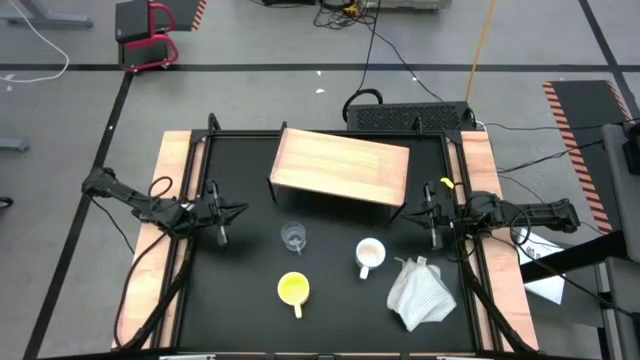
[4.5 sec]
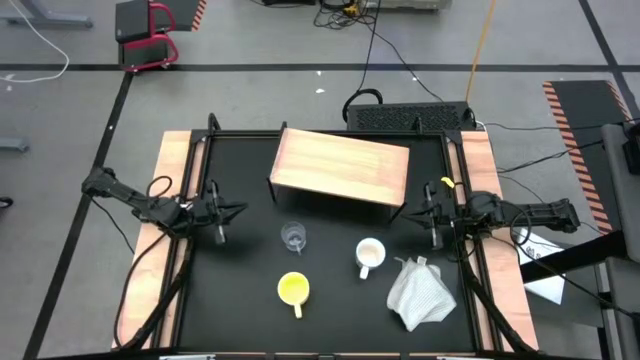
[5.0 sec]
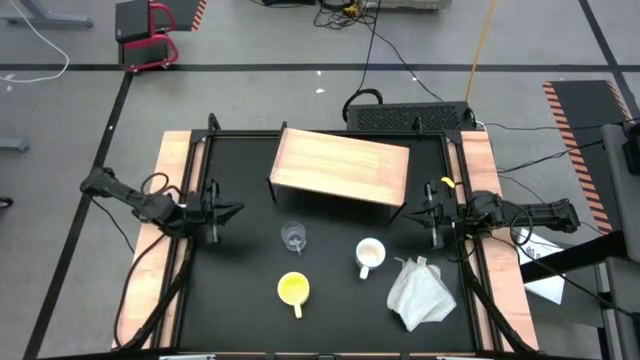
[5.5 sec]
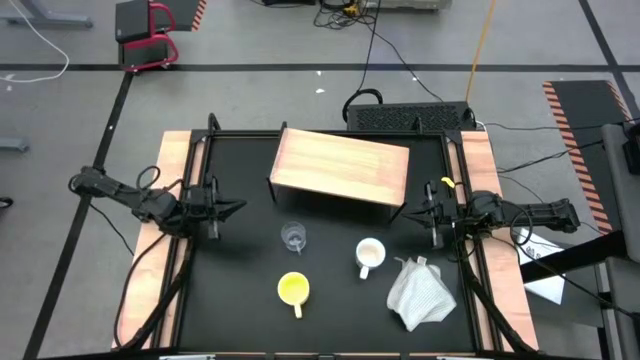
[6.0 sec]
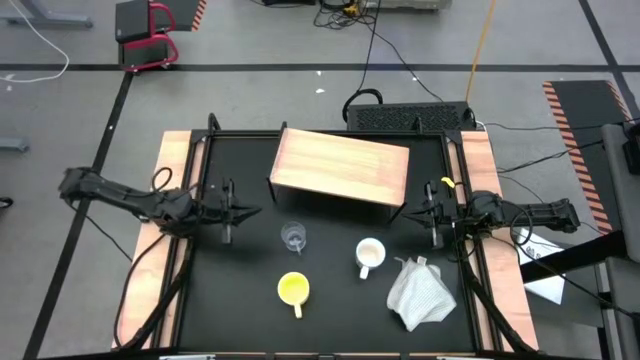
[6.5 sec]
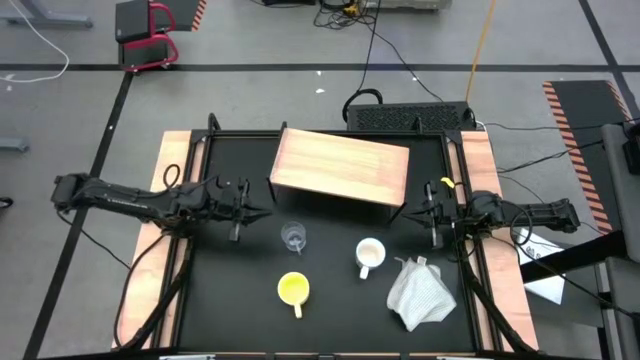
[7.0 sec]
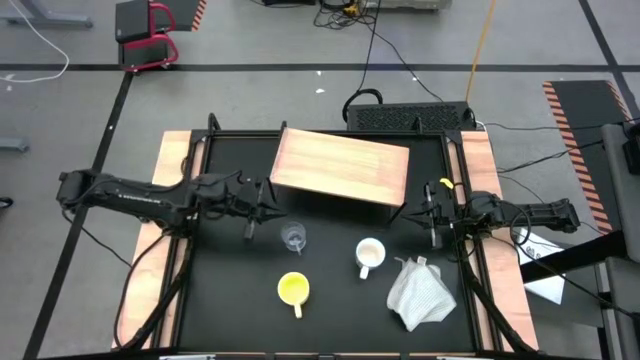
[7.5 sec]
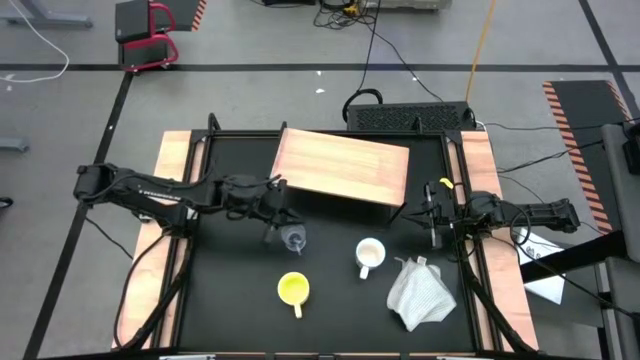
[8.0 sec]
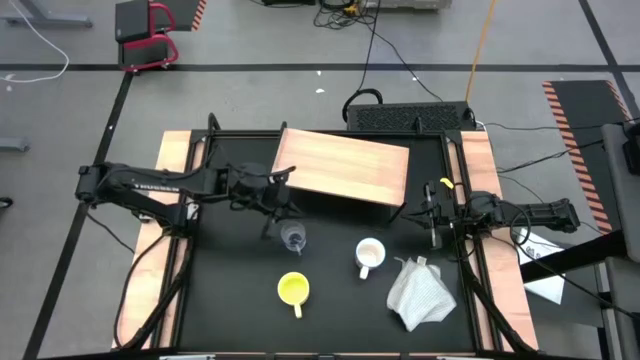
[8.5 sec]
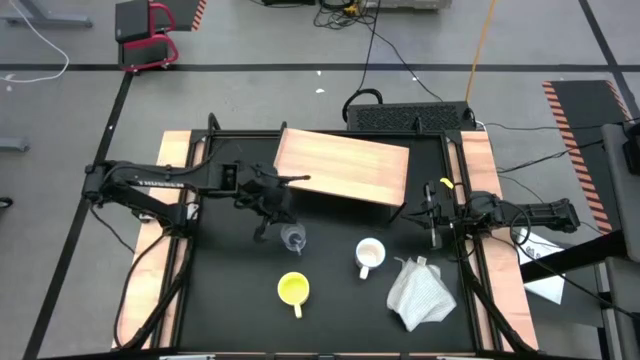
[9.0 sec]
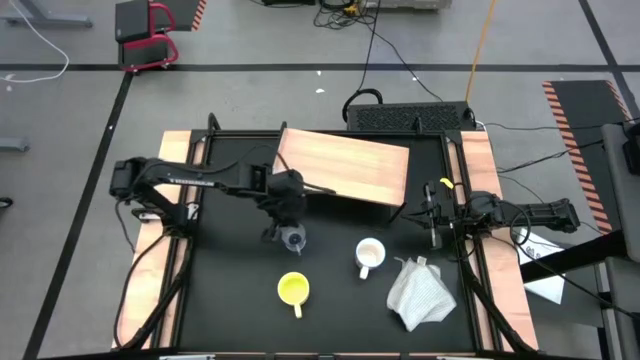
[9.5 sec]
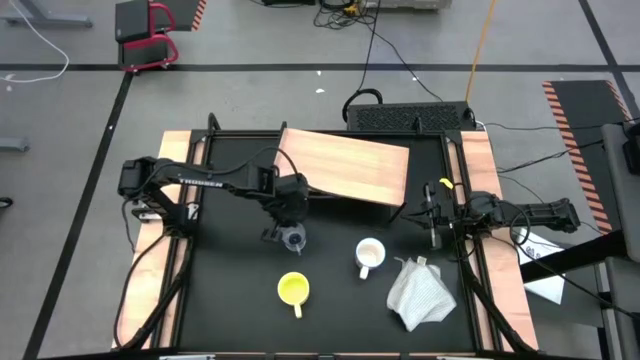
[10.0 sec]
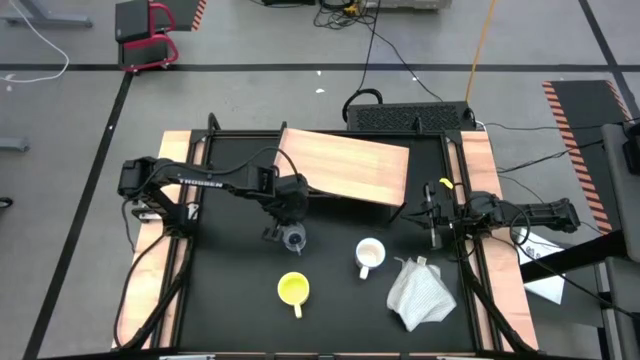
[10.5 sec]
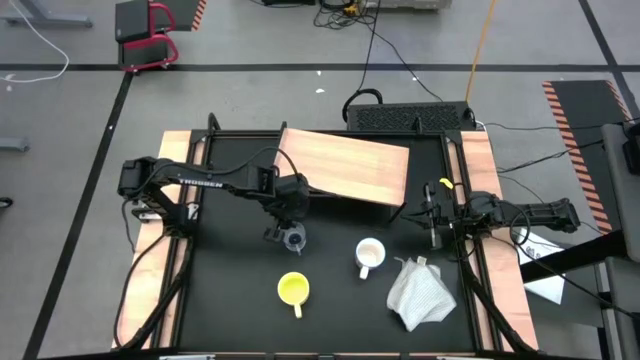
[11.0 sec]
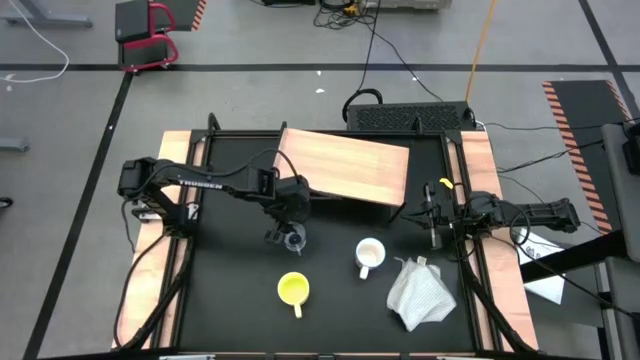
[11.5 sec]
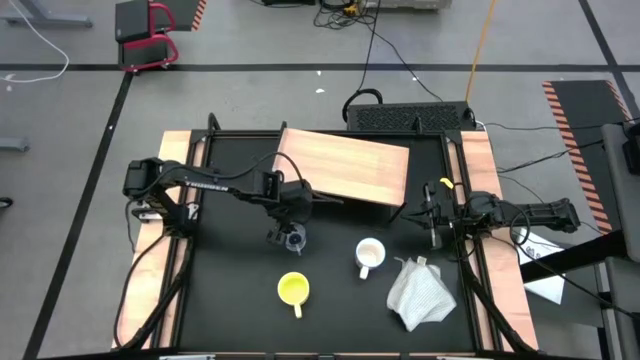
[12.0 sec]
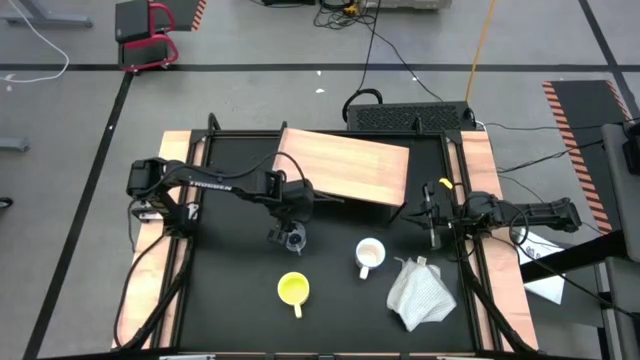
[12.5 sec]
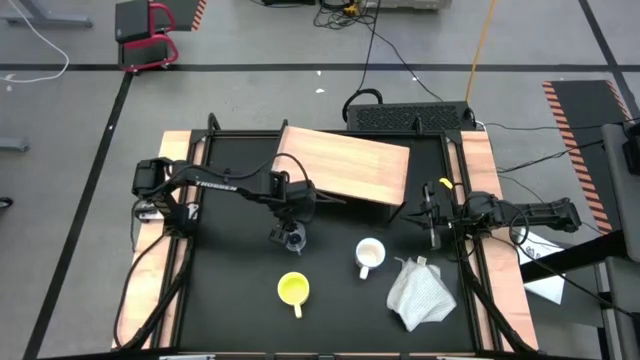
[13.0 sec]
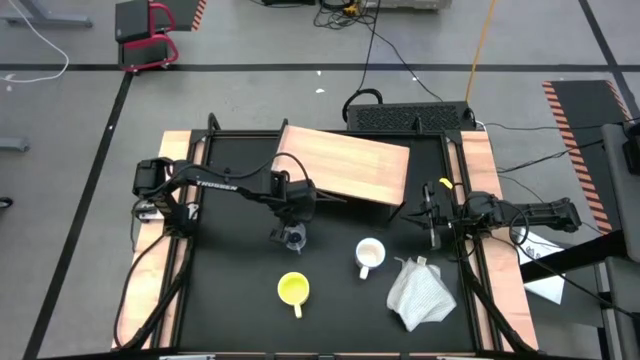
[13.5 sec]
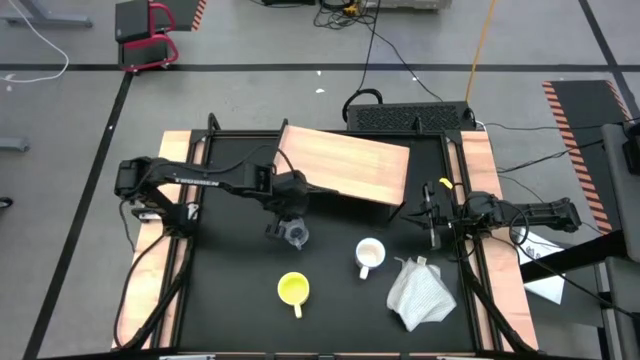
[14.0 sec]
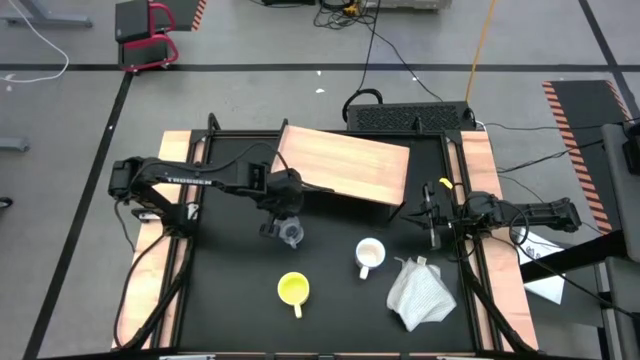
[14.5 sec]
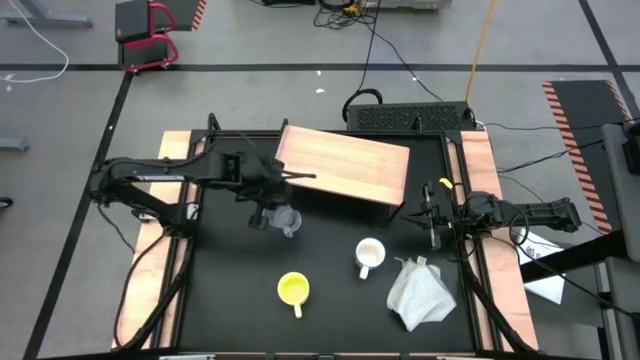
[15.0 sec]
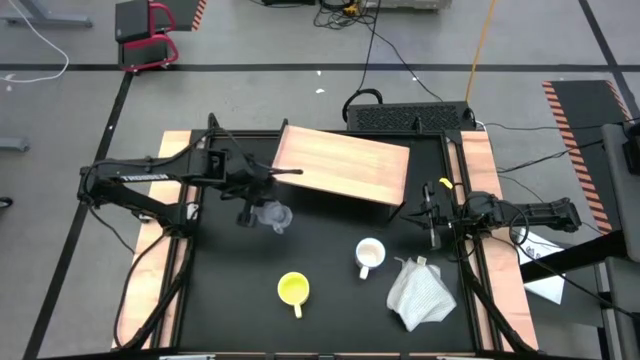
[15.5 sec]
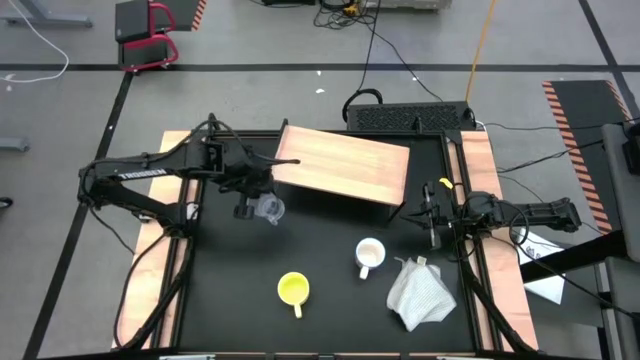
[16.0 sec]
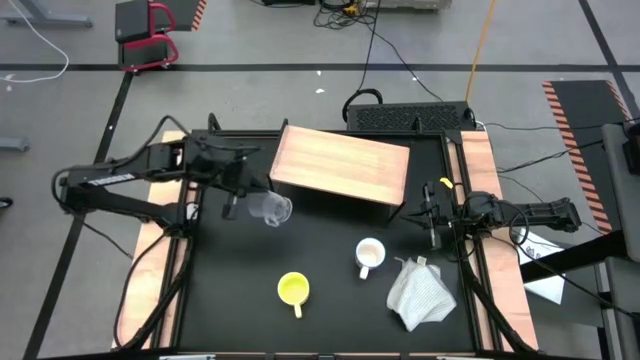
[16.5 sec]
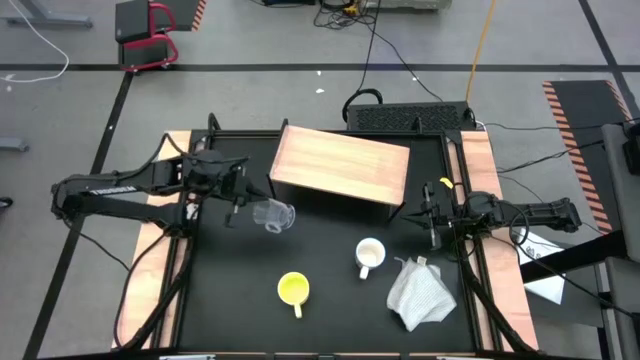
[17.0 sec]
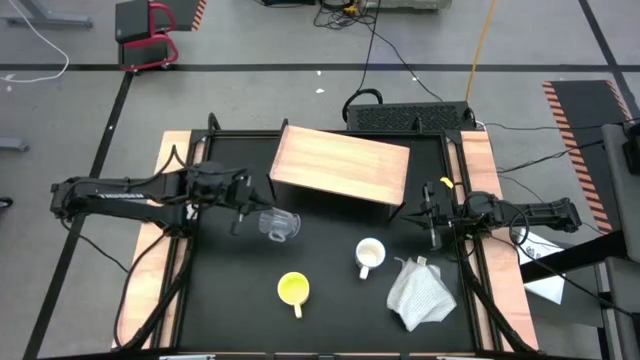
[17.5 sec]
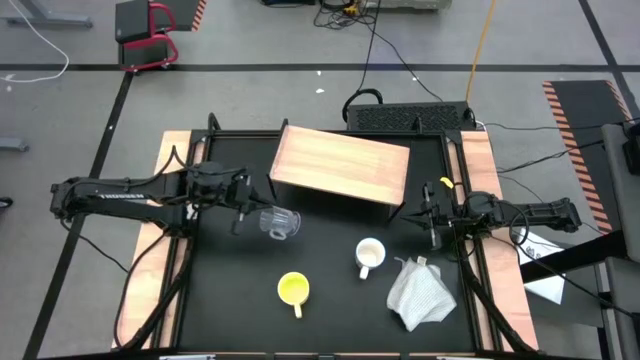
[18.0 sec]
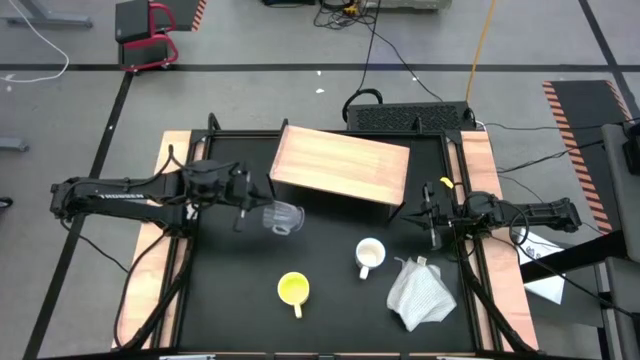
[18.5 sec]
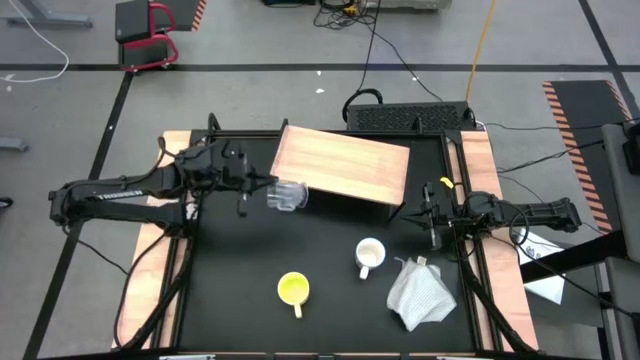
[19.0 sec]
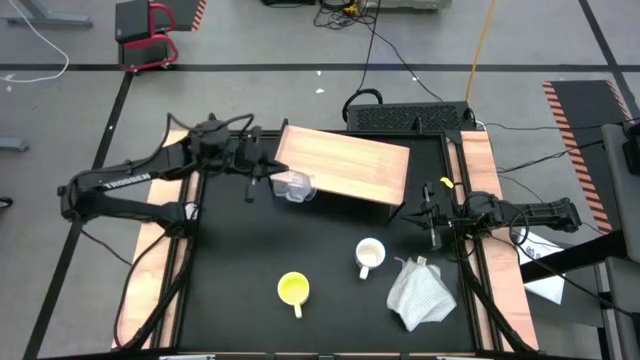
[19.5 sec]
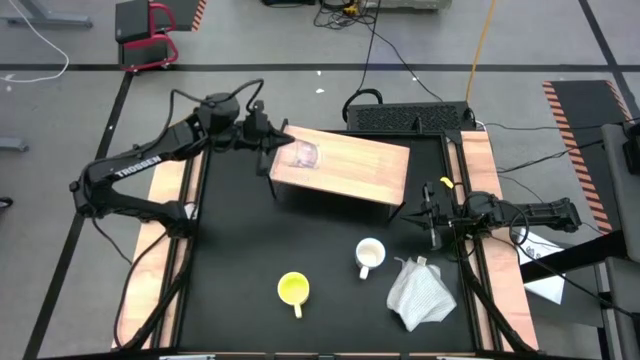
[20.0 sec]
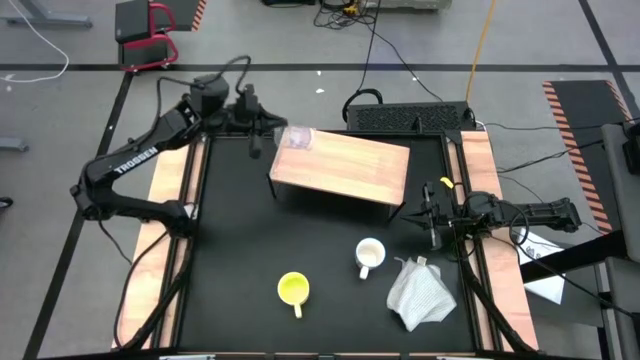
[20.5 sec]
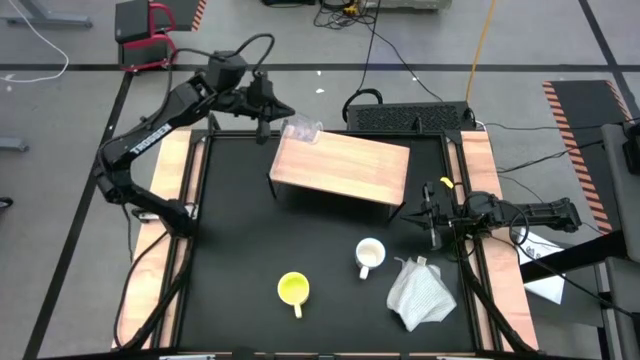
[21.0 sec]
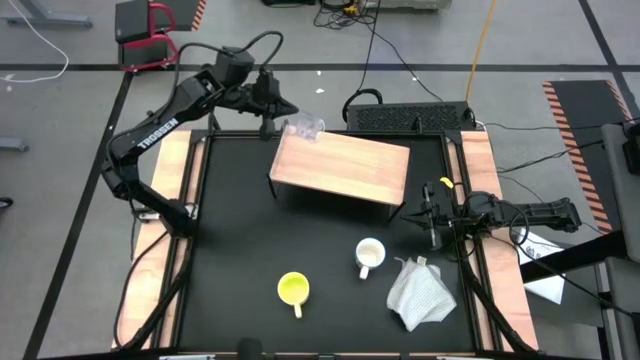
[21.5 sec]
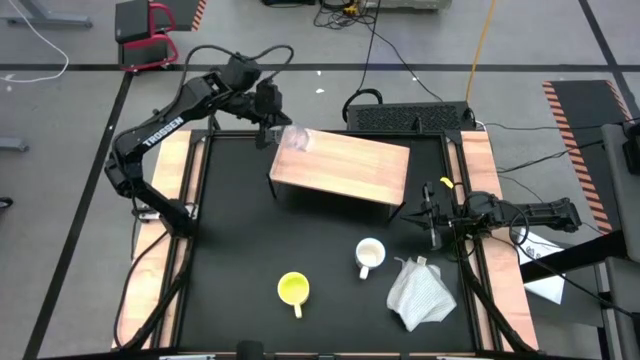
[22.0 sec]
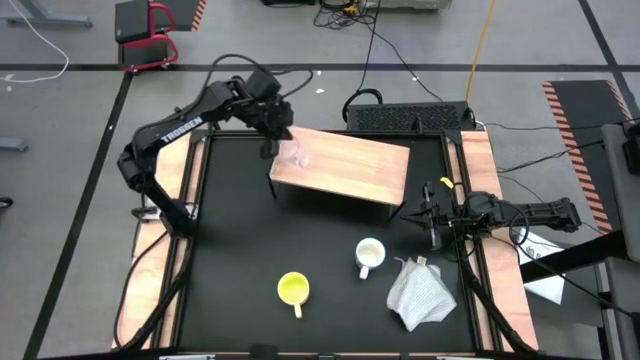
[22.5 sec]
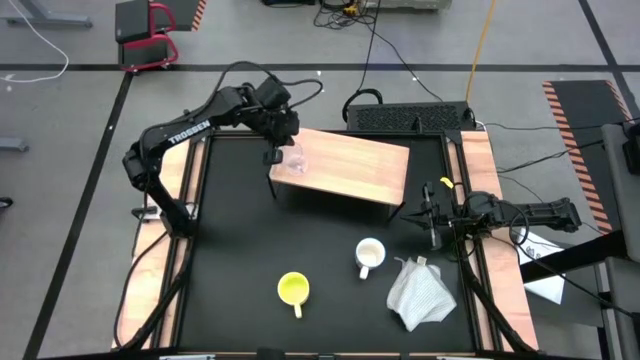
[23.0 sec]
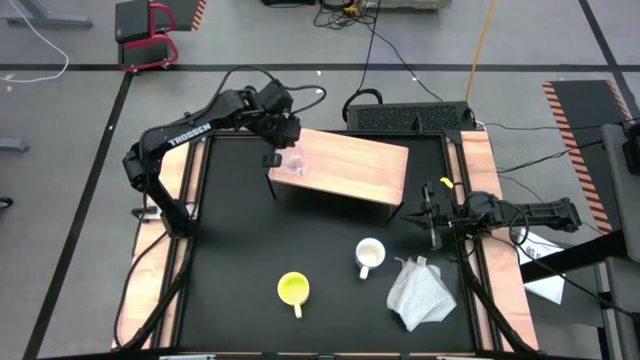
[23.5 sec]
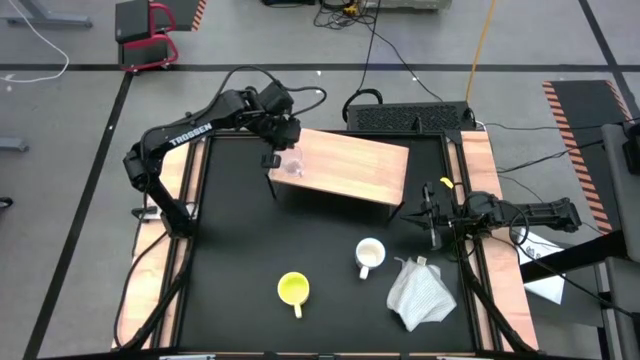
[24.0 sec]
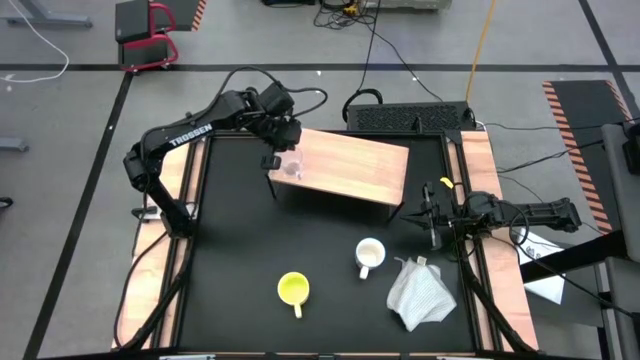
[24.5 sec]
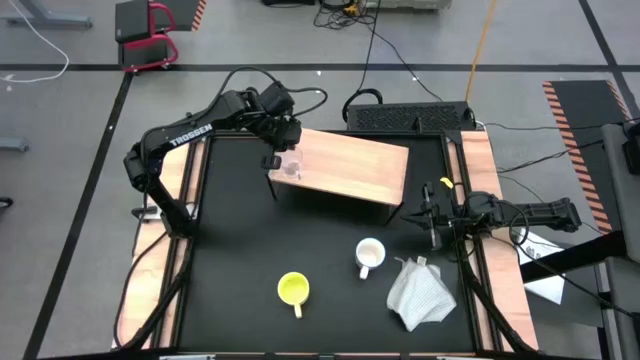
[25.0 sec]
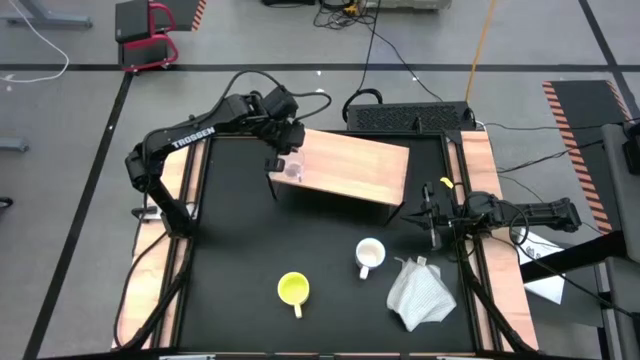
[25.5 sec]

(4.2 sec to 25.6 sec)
Task: Stack small to large cups/mugs on shelf
Put the transparent mug on the shelf
